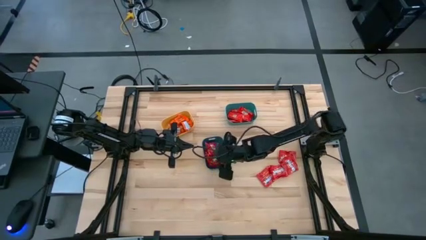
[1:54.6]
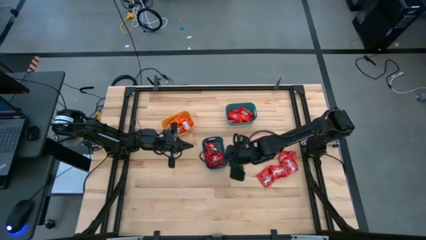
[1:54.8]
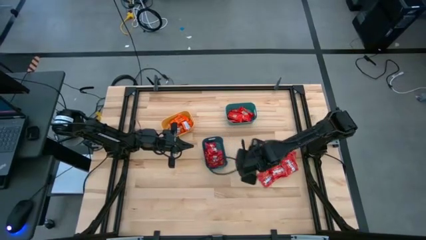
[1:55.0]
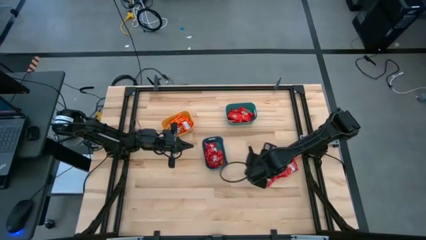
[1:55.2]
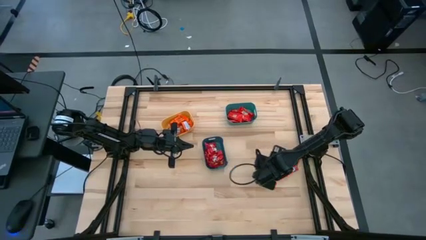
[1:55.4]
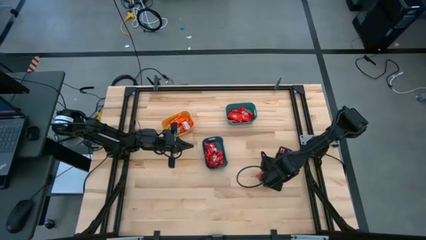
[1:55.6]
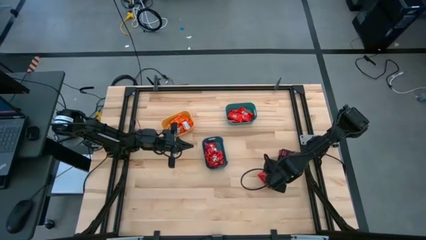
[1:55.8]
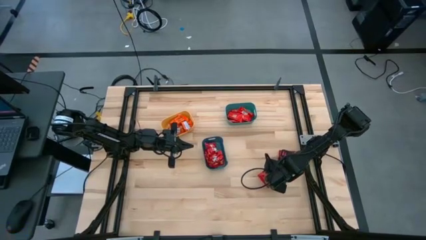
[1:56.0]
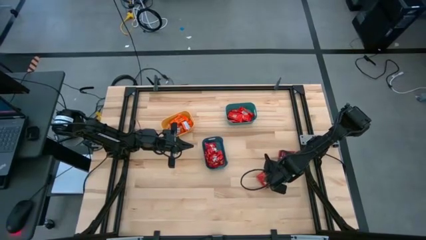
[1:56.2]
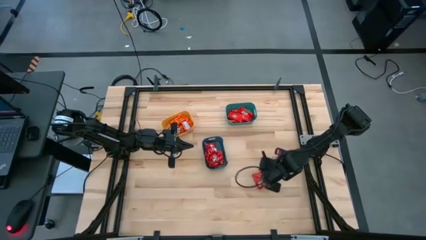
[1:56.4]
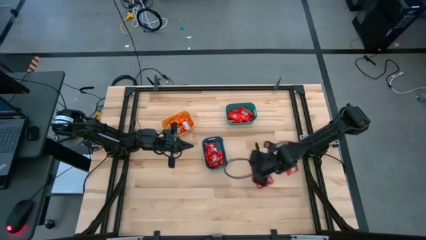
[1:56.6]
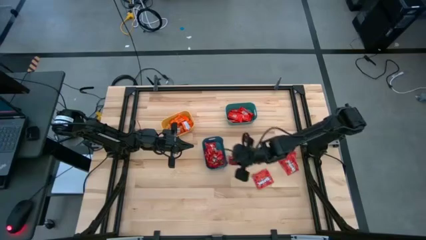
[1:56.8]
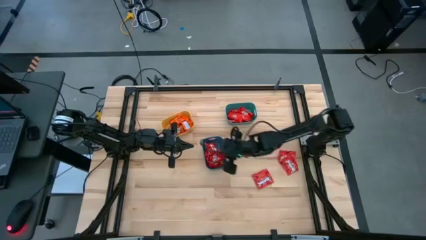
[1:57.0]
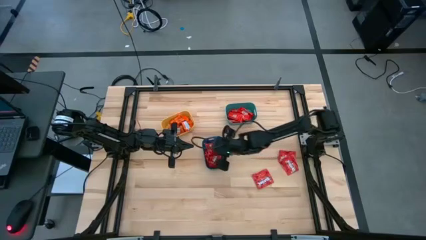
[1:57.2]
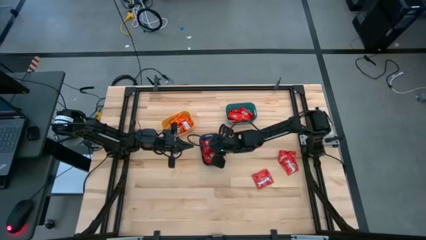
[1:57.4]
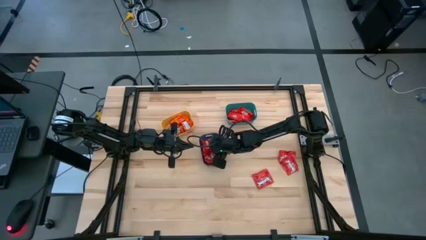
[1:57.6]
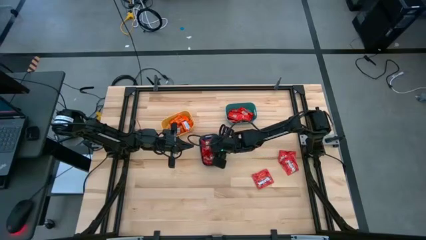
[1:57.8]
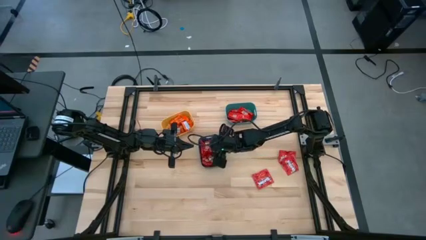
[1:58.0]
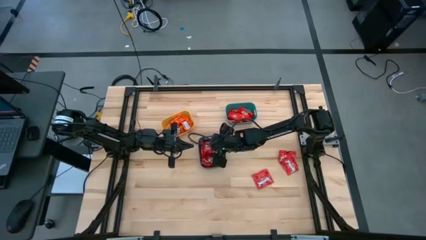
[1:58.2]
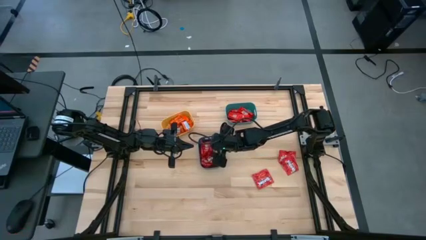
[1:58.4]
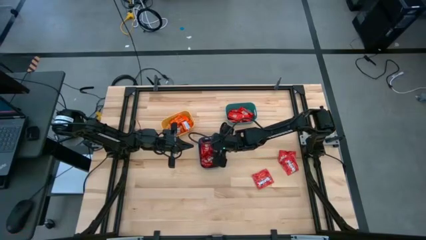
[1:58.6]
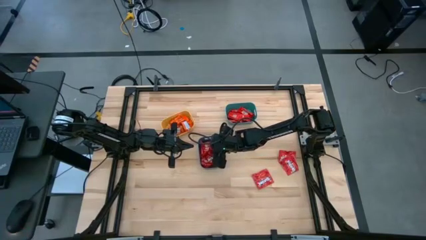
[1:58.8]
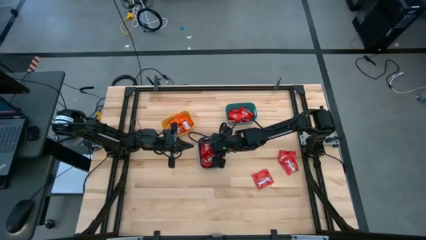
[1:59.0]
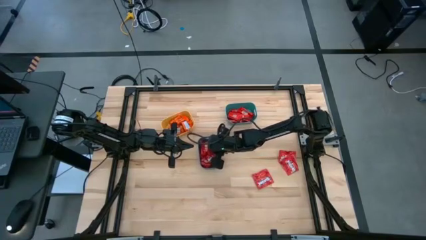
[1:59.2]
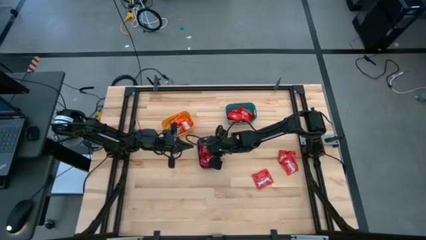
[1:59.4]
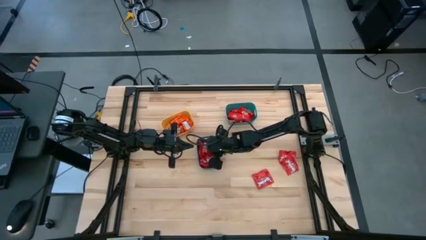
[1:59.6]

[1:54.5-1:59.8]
Task: Sort candy
Put the red candy into the blue bin

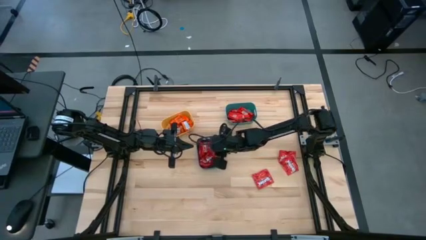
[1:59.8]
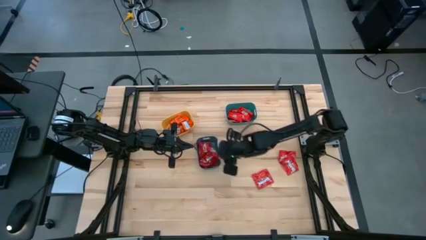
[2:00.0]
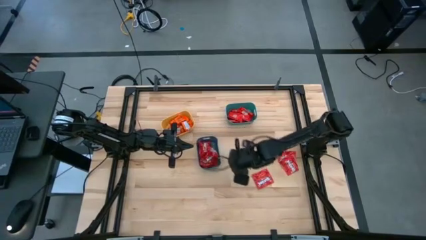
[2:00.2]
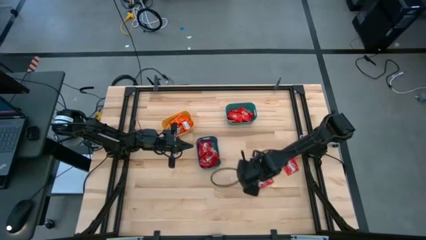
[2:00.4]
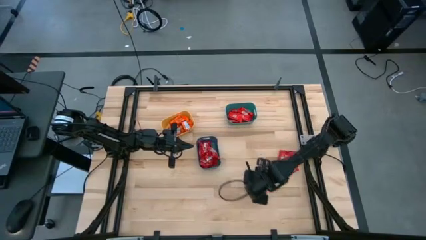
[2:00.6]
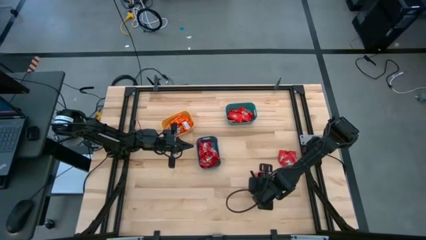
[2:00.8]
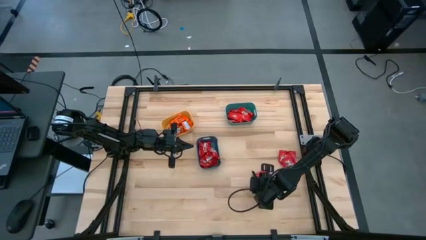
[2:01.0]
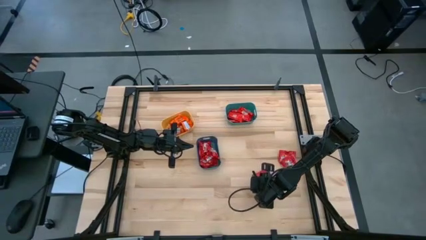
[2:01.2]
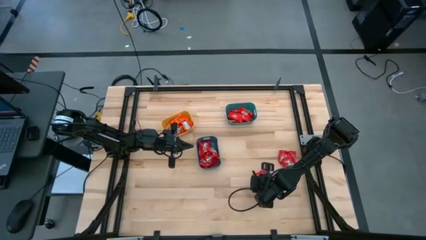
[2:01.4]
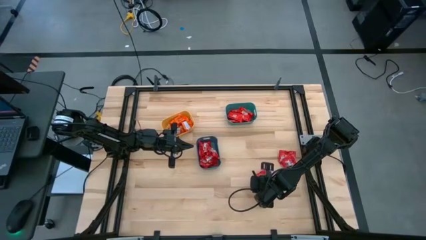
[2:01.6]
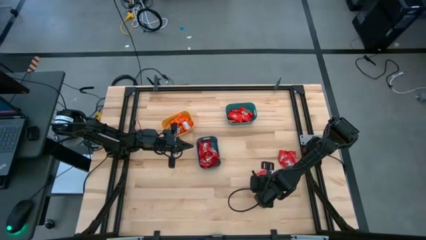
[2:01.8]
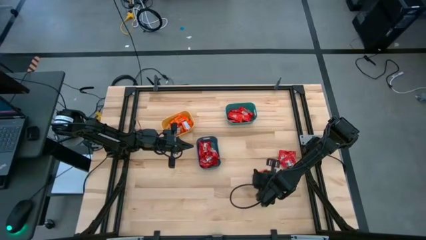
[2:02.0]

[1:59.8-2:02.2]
Put the red candy into the blue bin

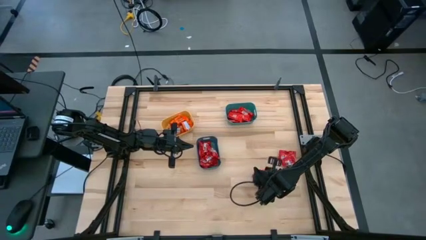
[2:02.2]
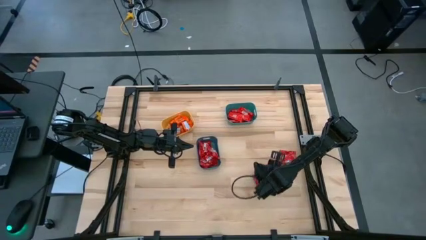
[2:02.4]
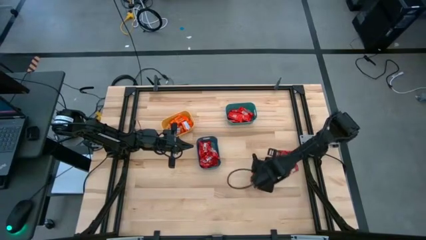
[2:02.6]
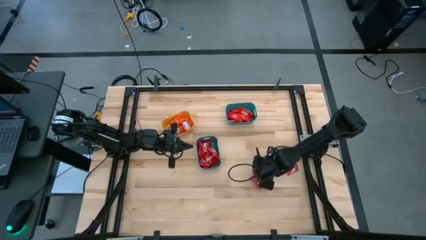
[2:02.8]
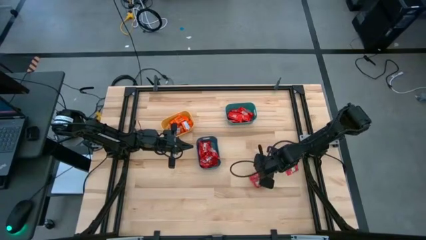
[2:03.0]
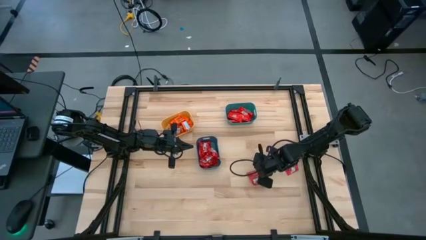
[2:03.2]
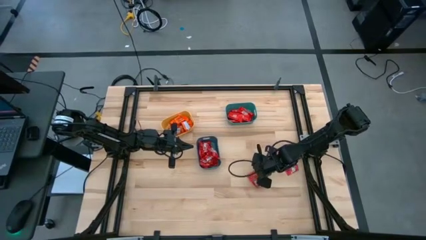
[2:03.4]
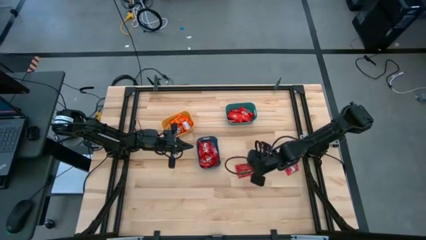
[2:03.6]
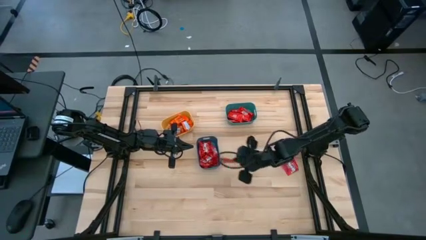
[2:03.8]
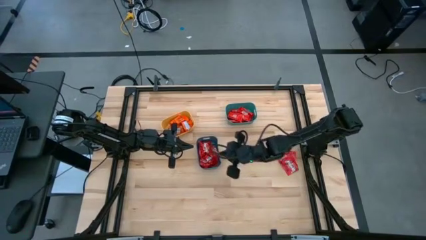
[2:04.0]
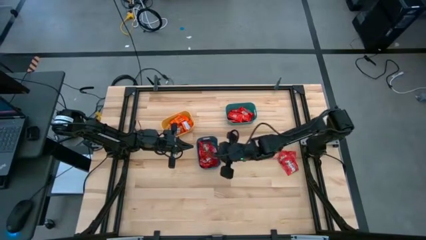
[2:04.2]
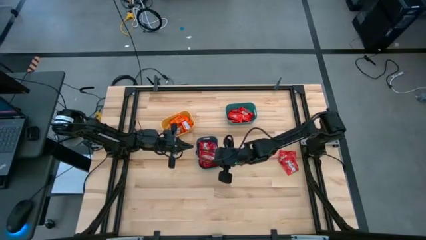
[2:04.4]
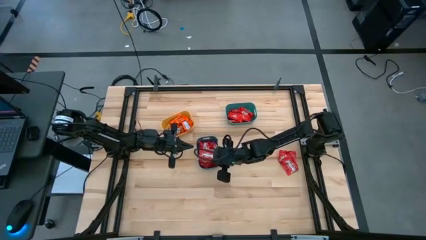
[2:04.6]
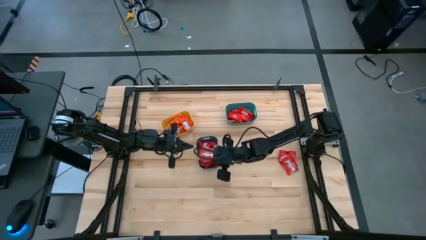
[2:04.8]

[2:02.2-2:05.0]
Put the red candy into the blue bin

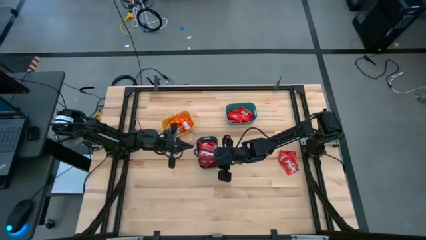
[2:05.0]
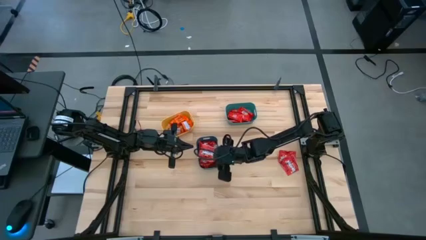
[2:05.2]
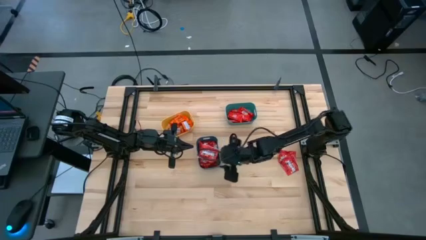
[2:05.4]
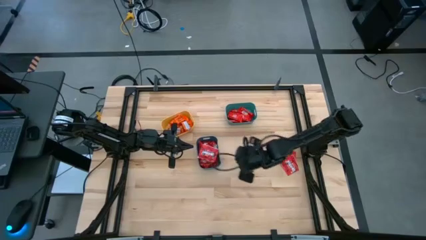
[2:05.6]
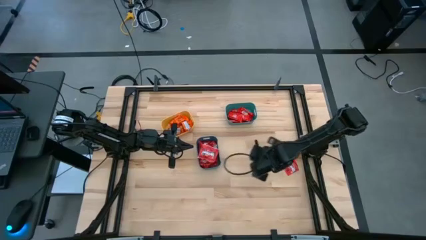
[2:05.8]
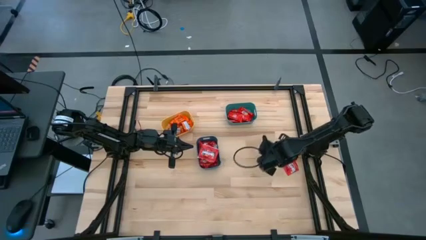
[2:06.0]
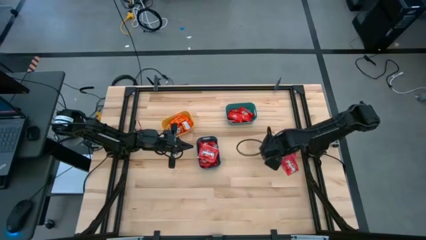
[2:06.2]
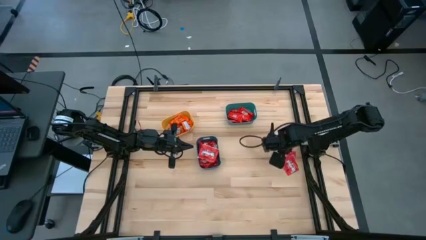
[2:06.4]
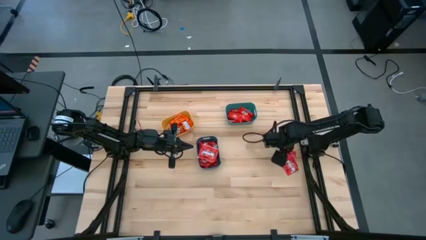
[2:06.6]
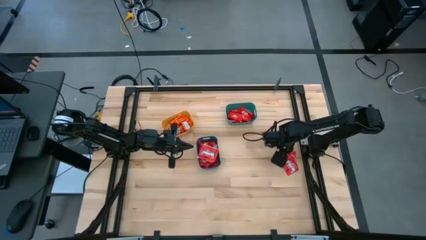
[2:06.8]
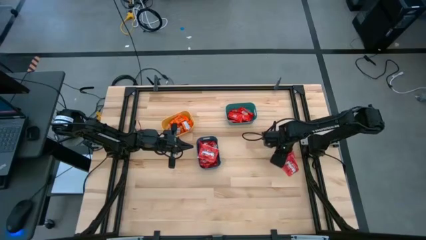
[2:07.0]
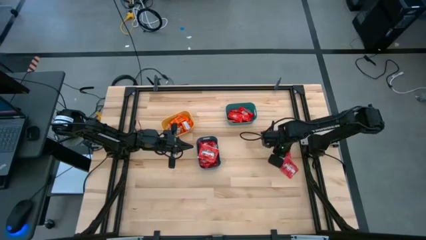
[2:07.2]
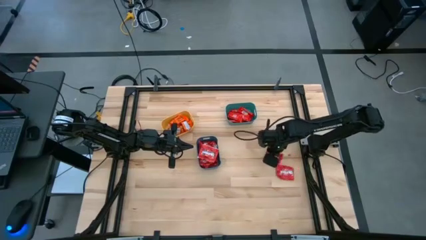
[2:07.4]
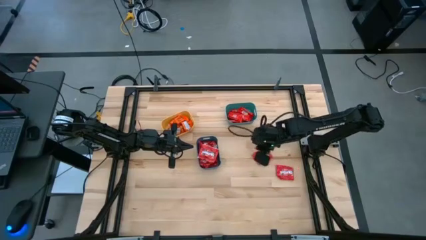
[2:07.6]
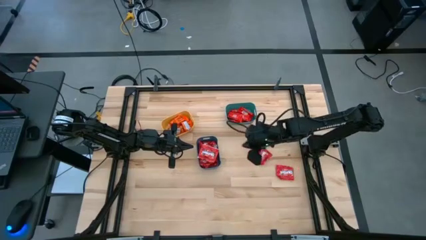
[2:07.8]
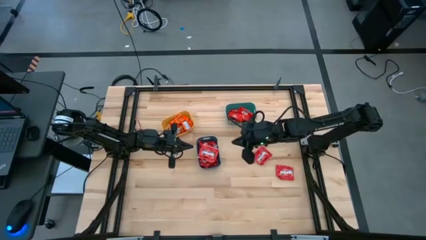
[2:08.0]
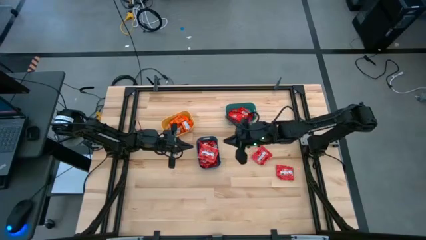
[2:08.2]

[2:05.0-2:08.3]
Put the red candy into the blue bin

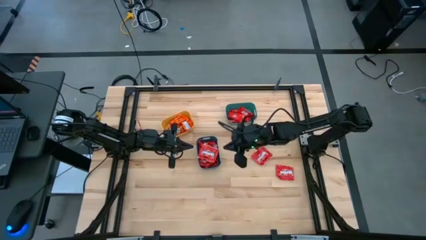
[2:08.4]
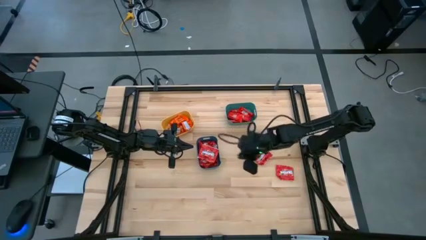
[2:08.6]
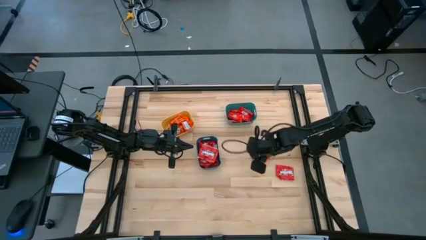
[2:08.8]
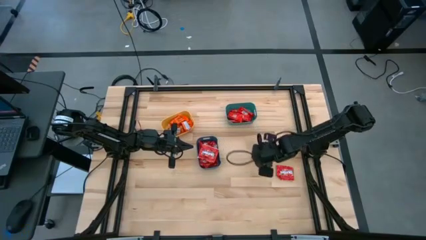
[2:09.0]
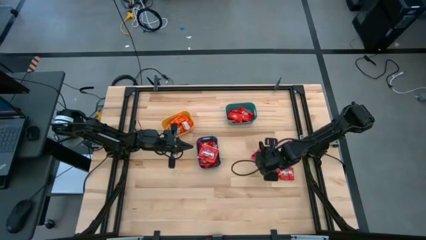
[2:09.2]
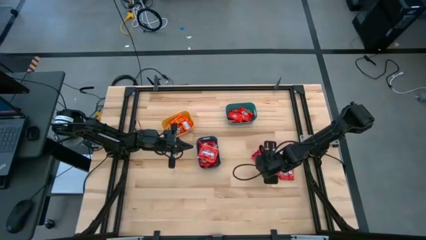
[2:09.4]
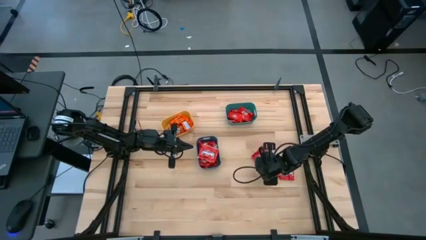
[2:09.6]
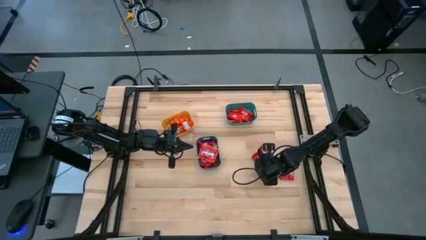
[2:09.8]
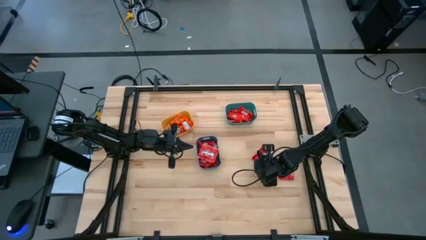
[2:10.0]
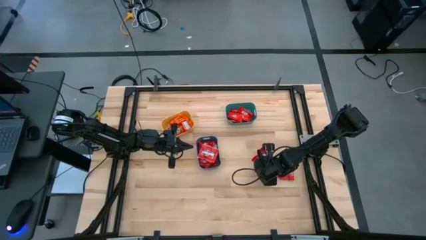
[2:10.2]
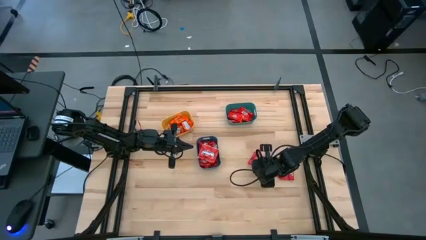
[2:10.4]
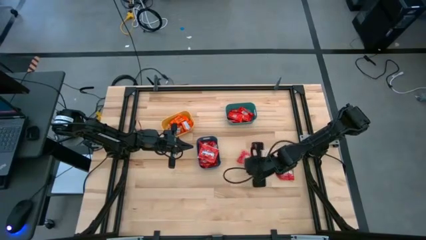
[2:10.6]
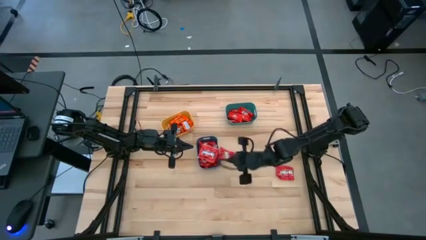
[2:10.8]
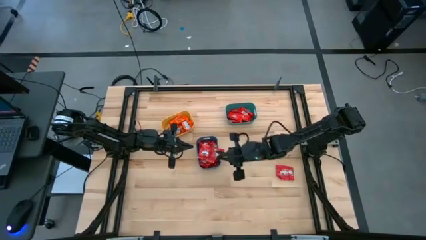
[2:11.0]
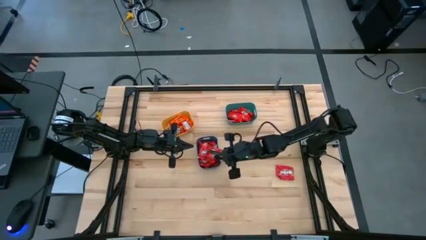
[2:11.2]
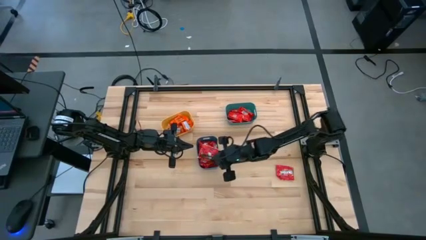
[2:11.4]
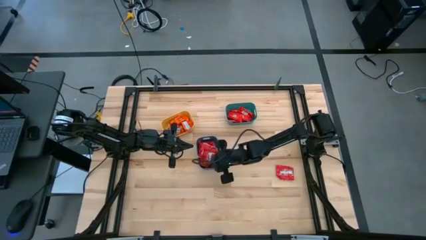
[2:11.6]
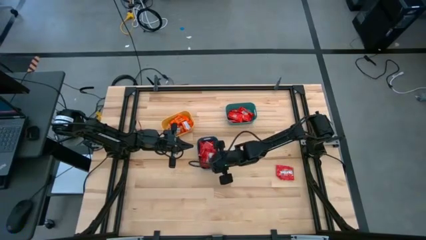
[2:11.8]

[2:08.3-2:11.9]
Put the red candy into the blue bin
